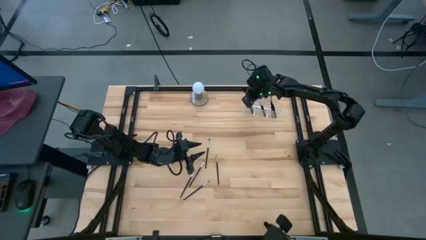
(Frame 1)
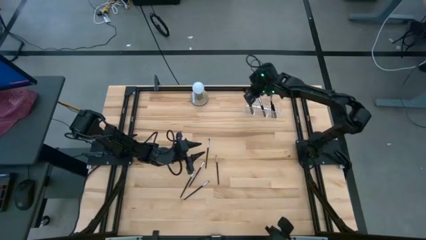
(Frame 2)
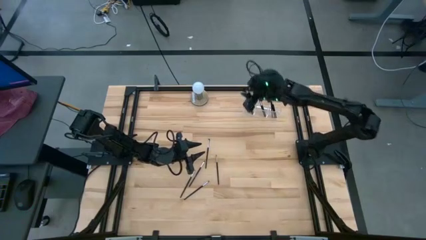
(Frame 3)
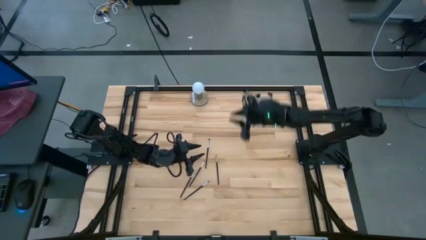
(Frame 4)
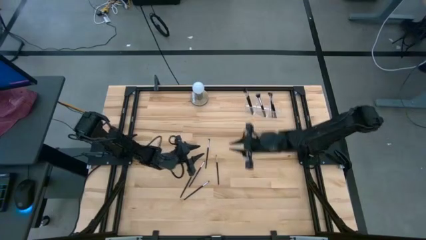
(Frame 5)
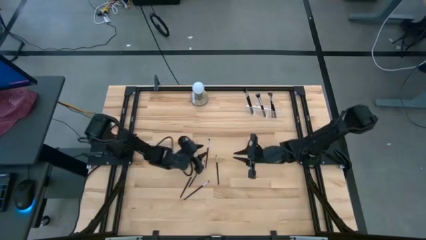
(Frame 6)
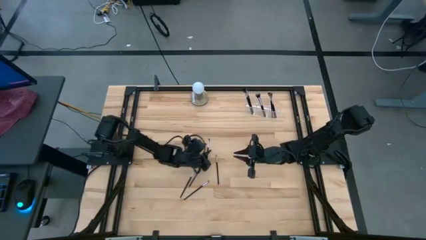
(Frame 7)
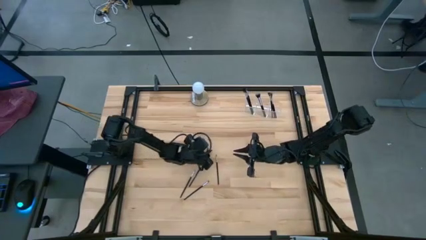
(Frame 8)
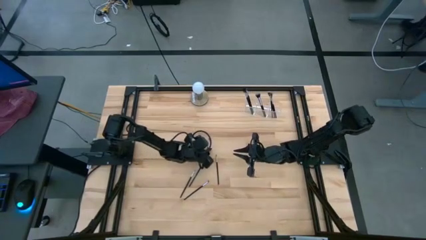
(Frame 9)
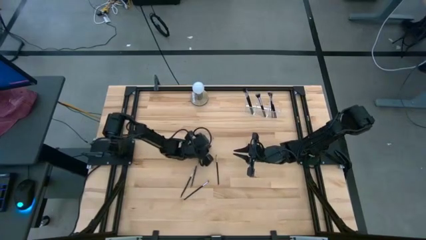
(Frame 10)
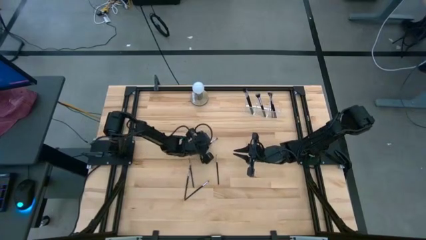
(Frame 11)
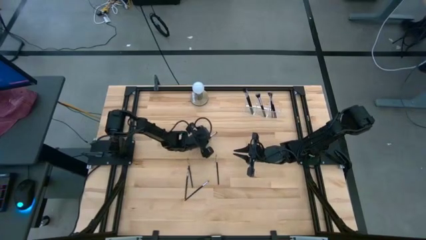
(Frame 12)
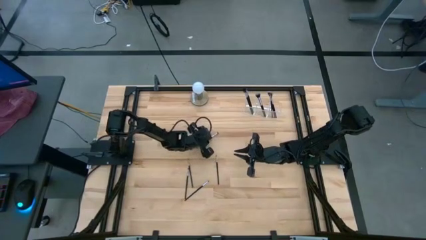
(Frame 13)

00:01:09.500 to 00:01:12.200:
Task: Put items in baskets/containers
Put the silver eyeshadow brush into the transparent organizer

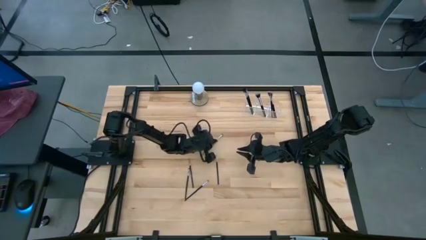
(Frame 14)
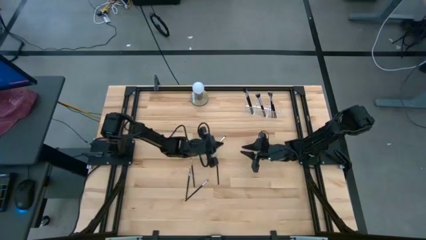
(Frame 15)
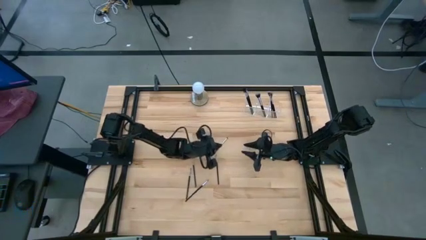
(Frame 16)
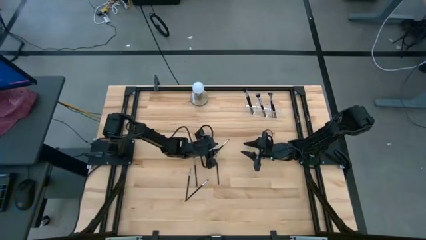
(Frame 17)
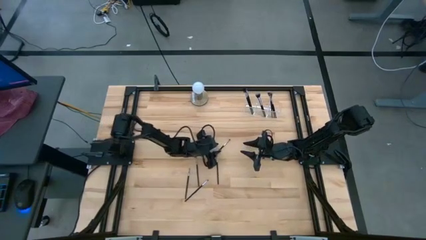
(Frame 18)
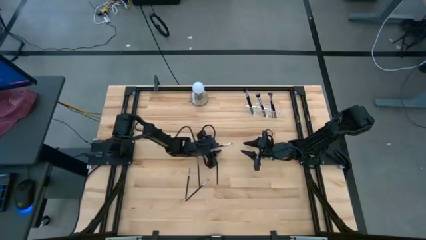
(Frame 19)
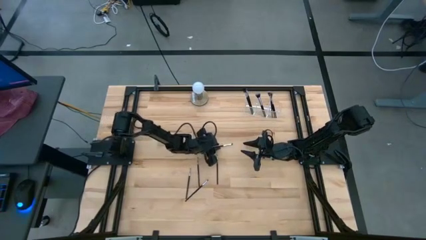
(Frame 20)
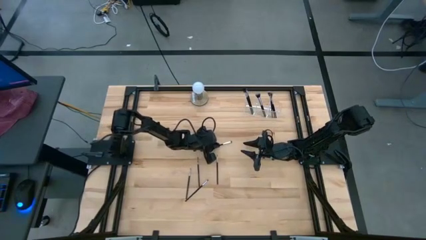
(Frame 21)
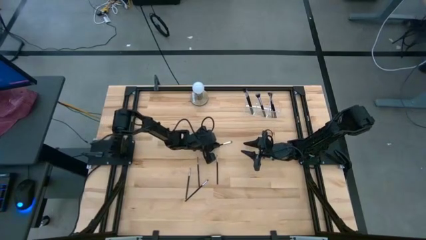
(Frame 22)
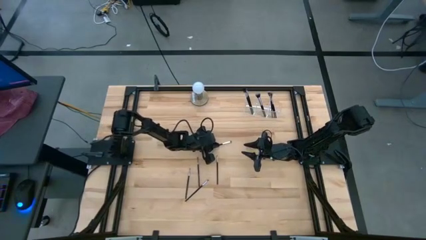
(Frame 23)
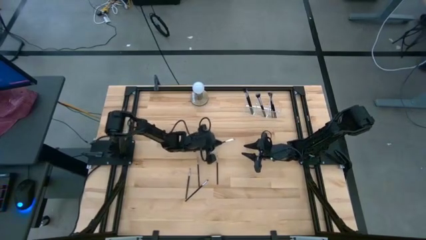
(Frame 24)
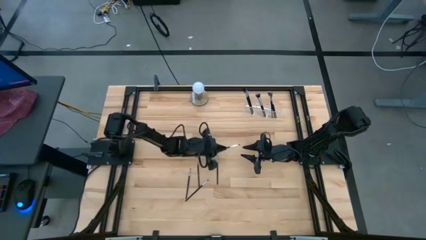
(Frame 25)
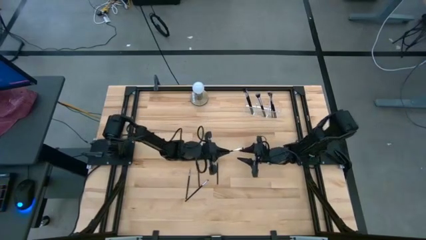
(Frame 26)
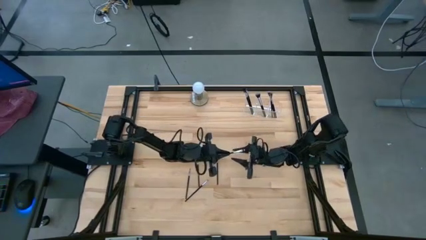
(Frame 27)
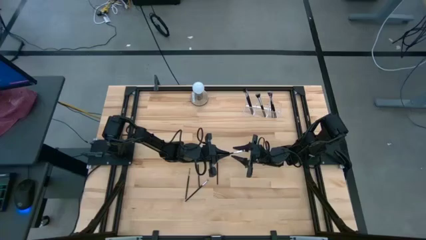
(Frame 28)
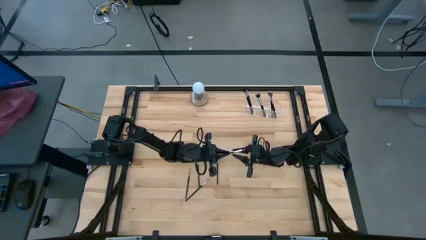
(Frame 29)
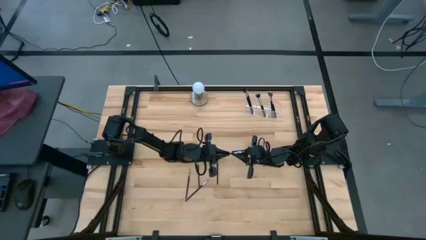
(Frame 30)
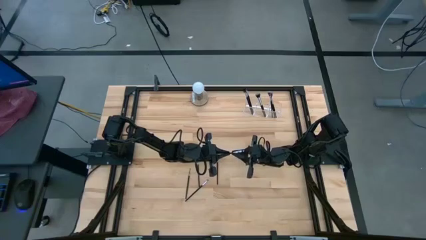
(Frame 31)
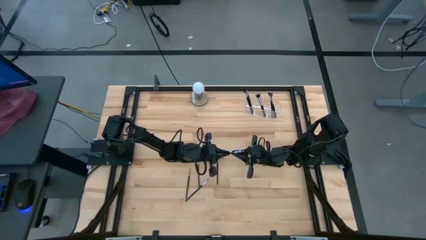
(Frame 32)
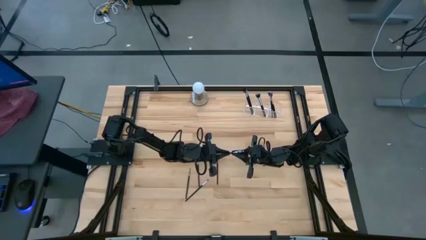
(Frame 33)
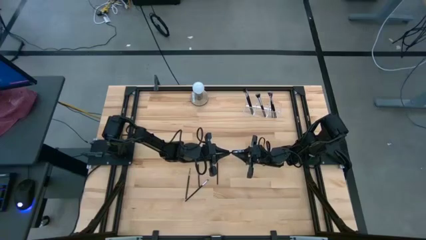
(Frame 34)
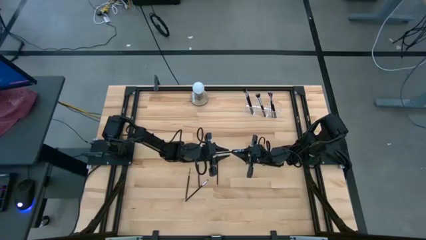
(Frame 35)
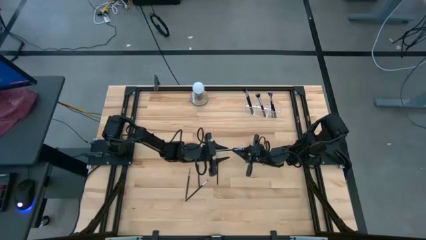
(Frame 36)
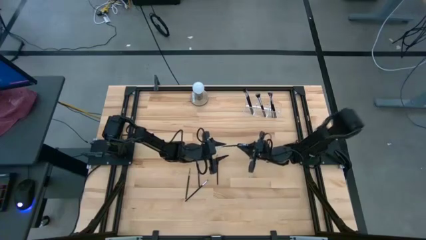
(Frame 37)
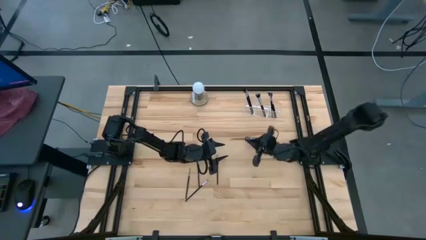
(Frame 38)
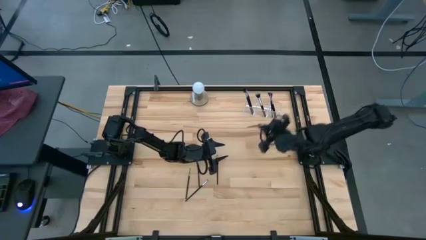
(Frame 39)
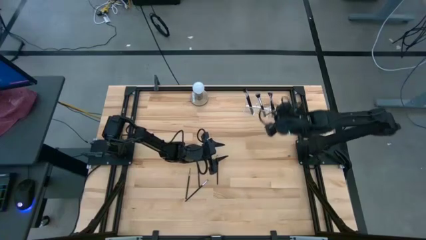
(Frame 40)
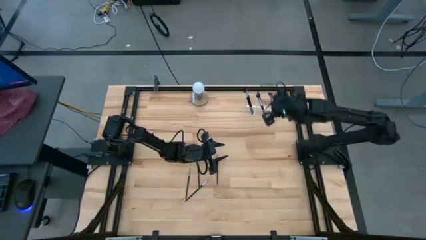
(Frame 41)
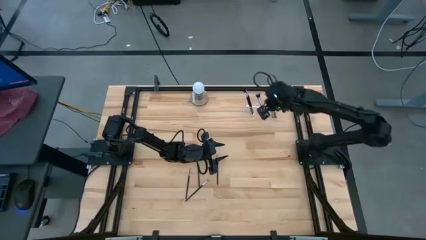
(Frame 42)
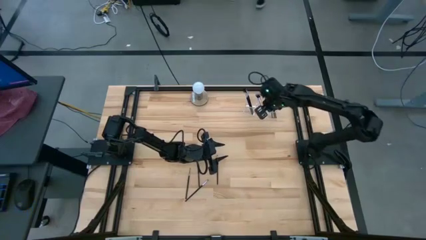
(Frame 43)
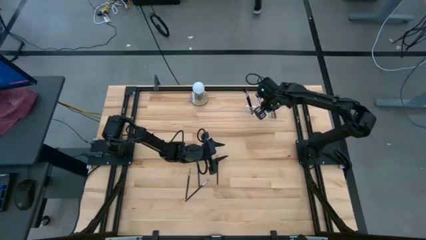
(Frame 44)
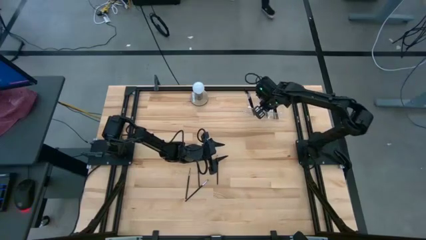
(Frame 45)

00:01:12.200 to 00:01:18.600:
Put the silver eyeshadow brush into the transparent organizer

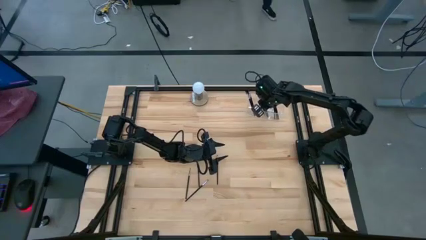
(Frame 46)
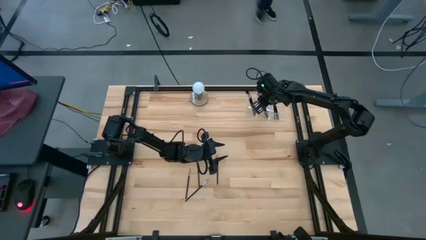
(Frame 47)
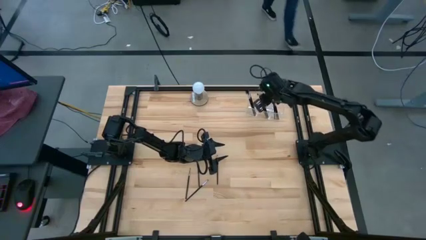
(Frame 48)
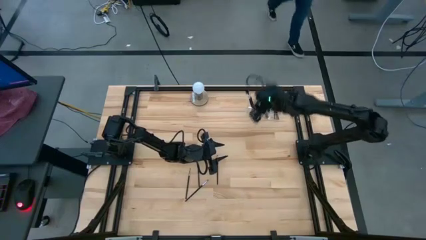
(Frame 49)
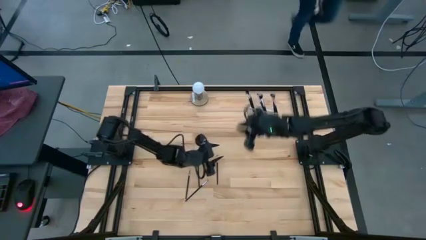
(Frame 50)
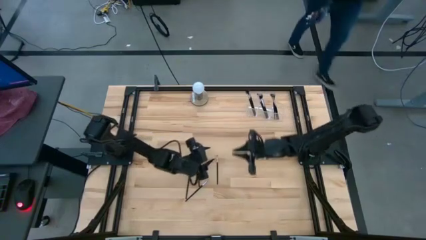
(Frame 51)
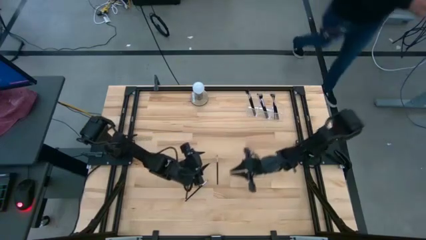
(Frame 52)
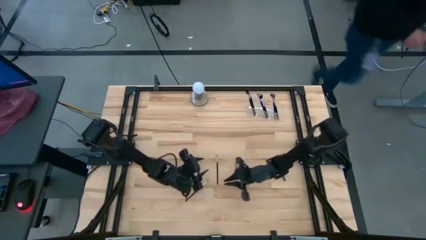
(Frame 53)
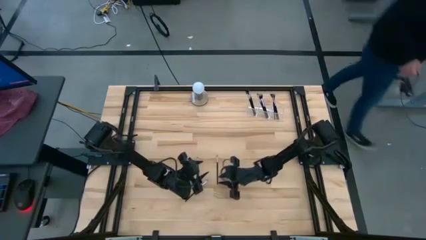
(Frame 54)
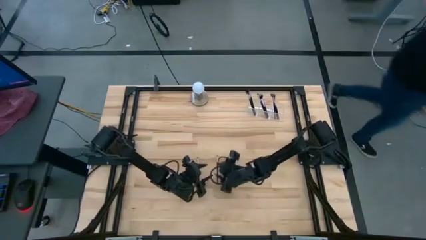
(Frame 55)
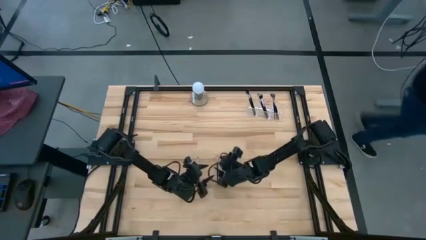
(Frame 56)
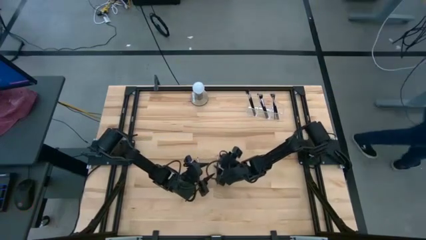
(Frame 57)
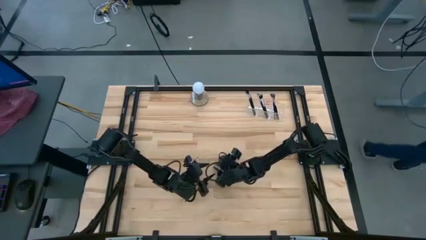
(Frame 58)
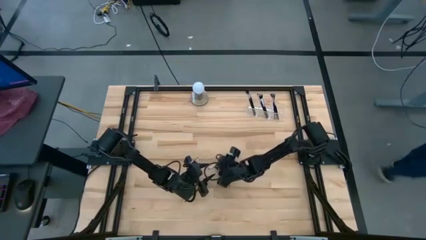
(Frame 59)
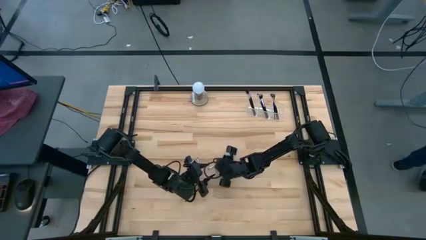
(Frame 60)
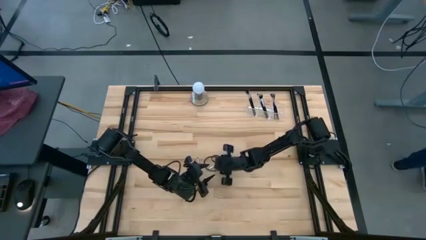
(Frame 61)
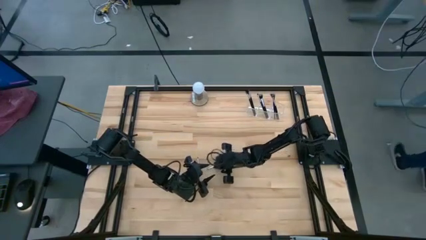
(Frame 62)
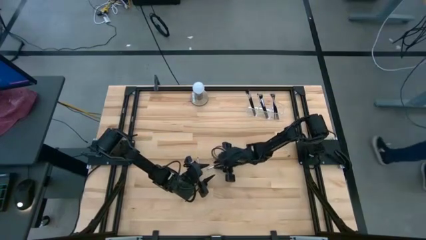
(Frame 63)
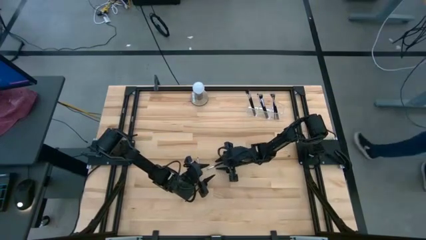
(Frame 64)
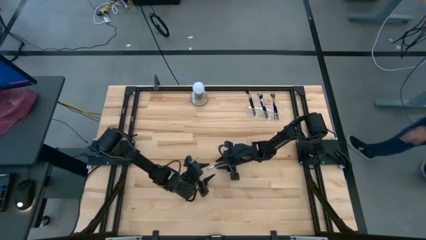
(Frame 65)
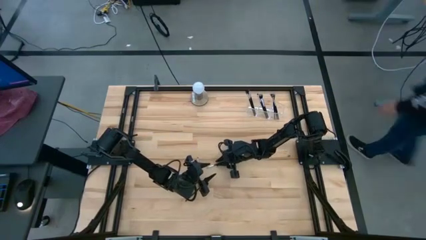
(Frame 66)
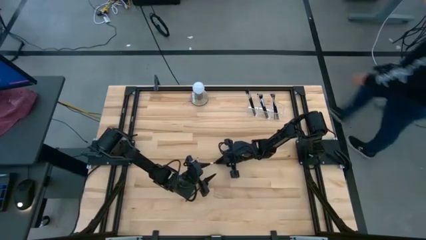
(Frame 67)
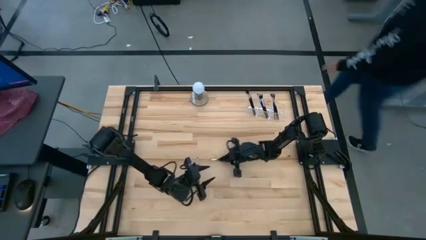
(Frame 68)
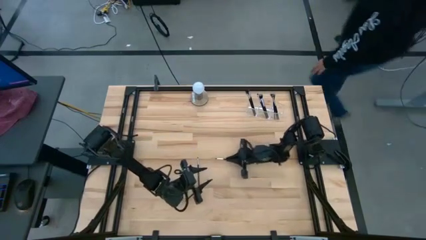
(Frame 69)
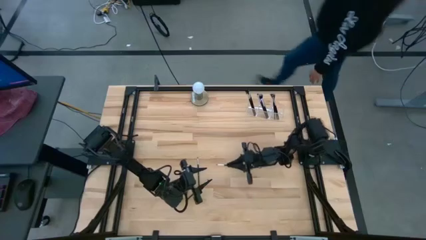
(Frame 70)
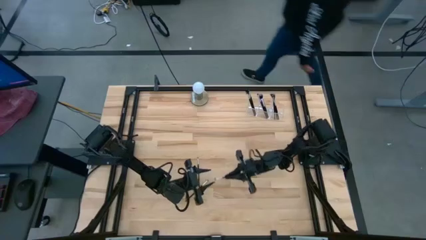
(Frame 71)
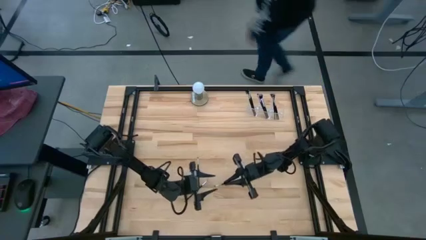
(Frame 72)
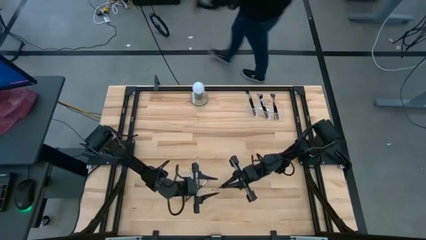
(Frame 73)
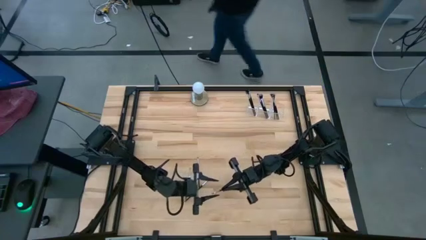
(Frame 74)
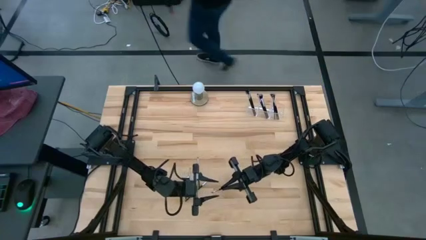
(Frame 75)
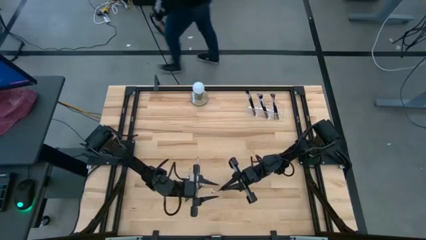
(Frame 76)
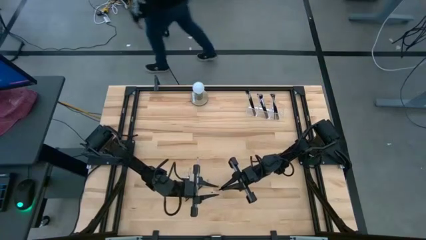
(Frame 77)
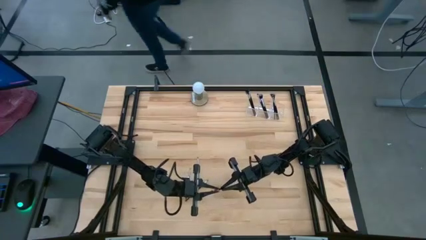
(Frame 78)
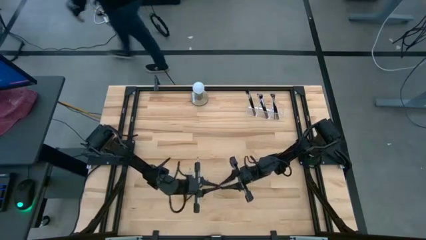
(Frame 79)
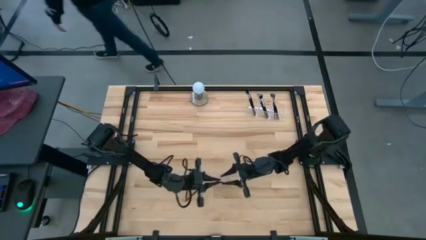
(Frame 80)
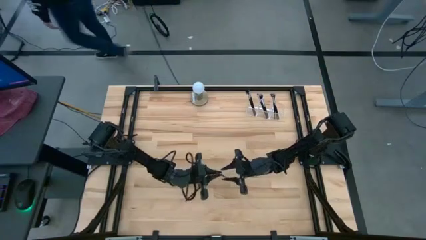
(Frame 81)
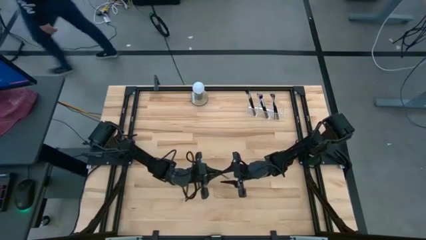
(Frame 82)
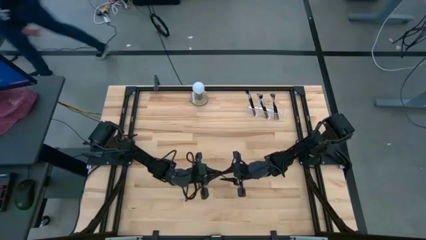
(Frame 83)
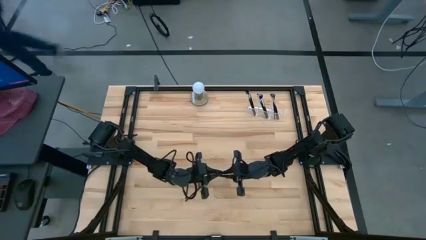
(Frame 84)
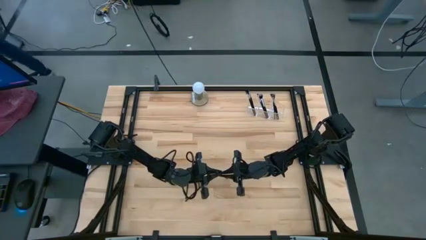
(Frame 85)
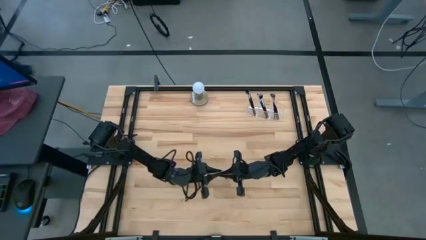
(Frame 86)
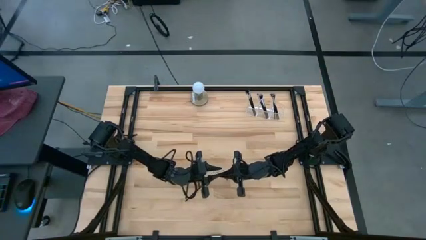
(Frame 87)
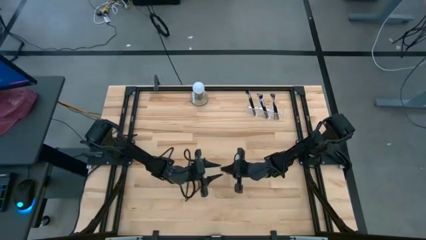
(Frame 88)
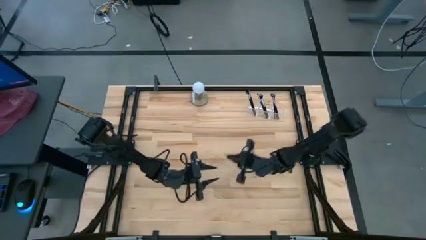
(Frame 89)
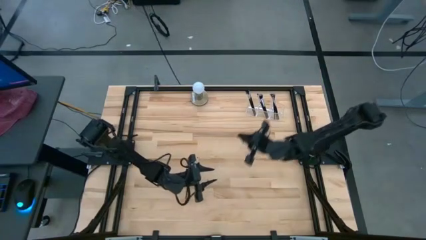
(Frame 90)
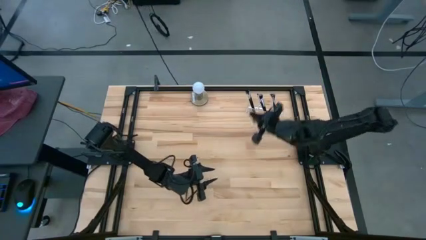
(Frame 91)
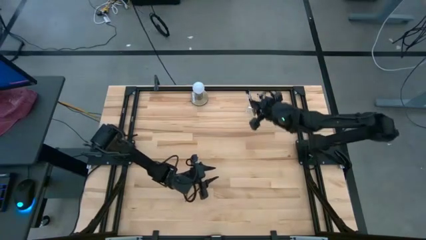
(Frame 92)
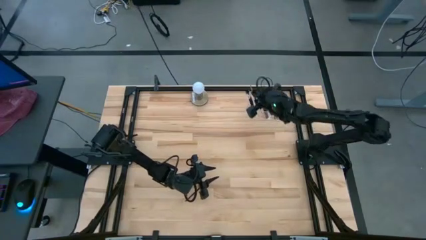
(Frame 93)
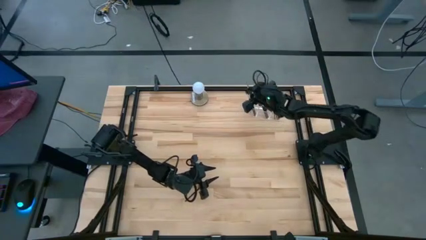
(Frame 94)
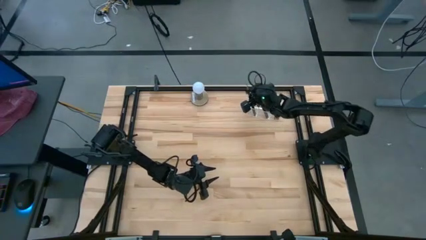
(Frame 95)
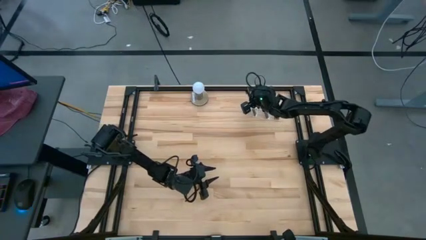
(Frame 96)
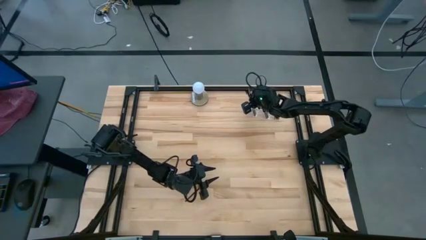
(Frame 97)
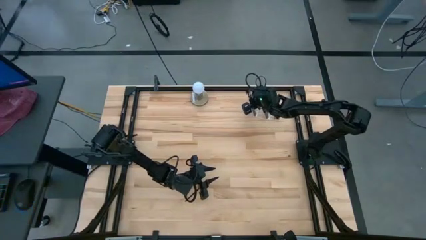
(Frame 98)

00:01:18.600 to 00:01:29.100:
Put the silver eyeshadow brush into the transparent organizer
